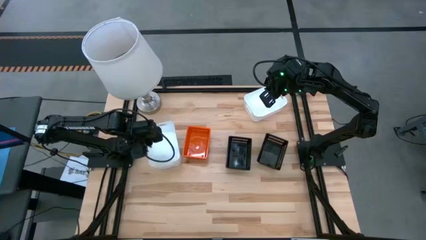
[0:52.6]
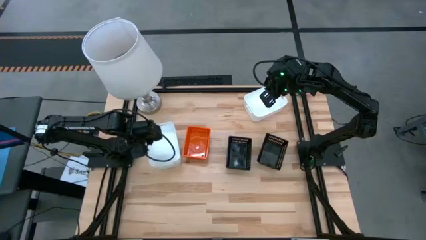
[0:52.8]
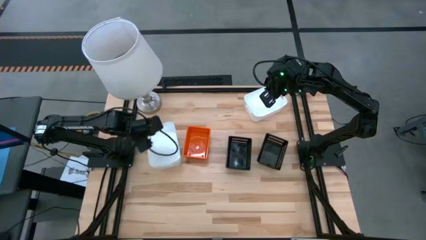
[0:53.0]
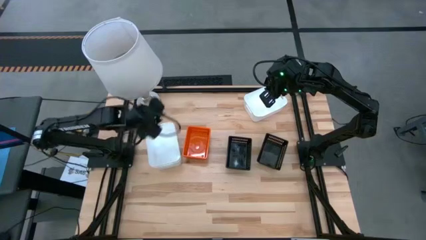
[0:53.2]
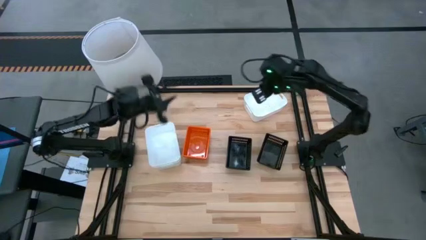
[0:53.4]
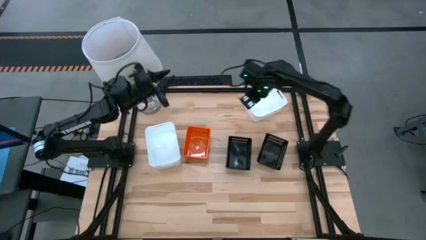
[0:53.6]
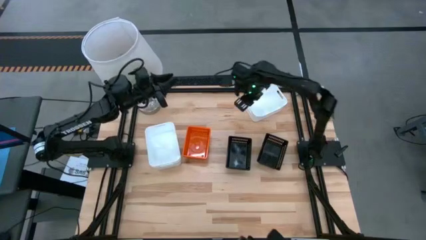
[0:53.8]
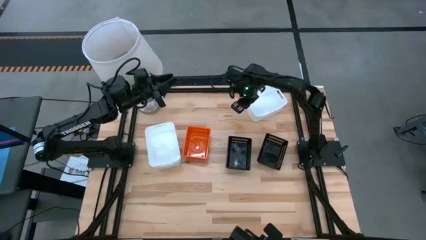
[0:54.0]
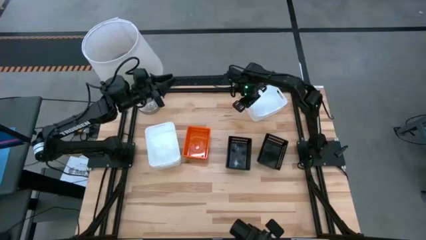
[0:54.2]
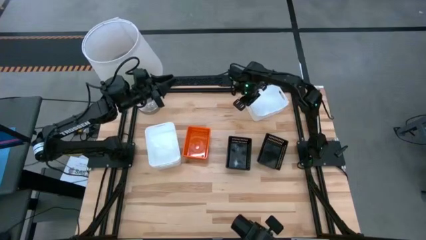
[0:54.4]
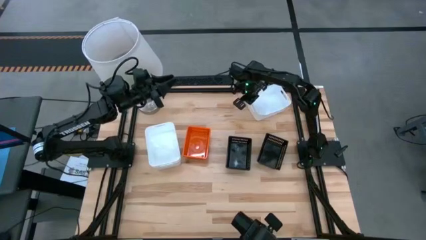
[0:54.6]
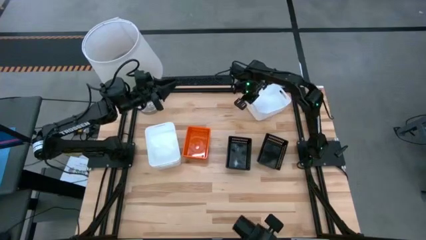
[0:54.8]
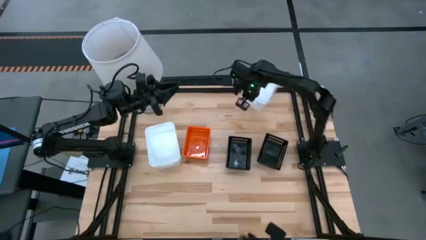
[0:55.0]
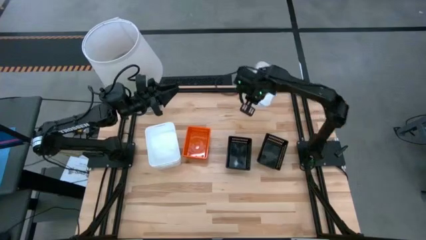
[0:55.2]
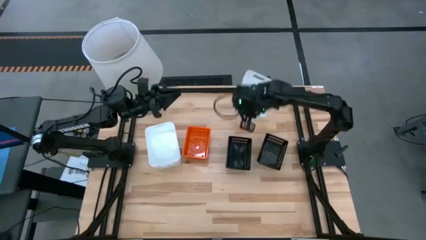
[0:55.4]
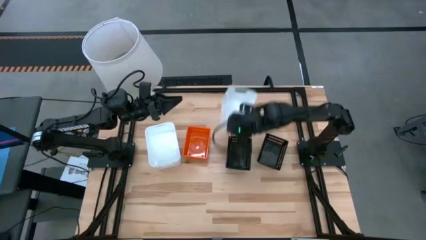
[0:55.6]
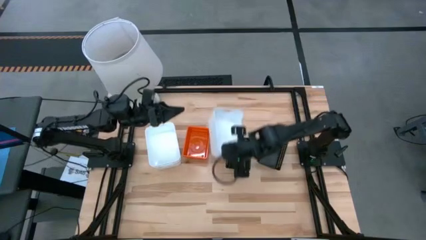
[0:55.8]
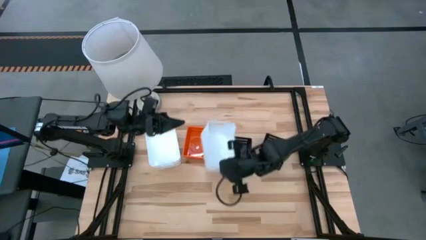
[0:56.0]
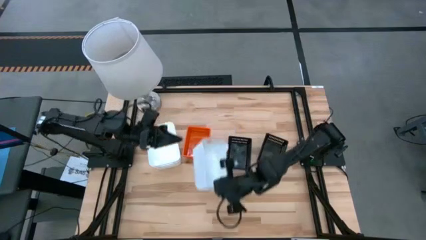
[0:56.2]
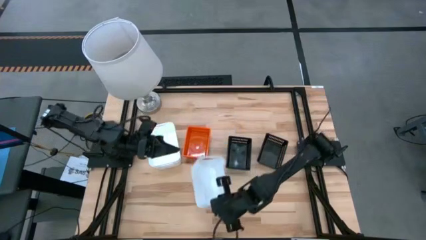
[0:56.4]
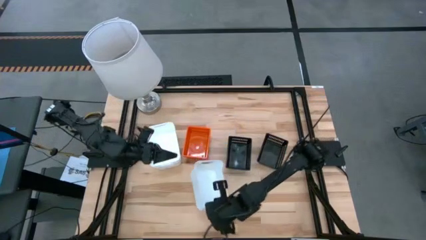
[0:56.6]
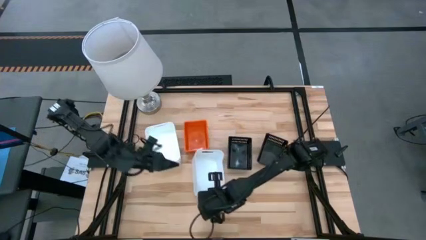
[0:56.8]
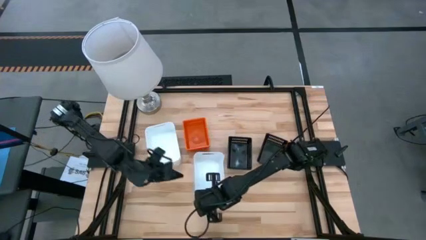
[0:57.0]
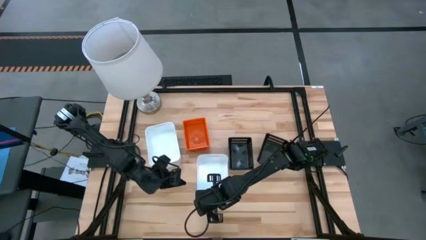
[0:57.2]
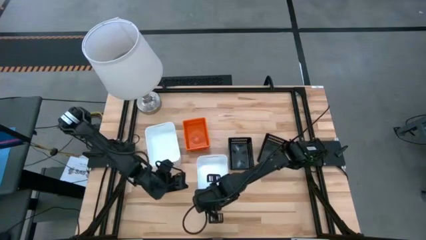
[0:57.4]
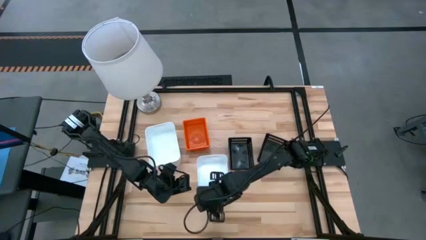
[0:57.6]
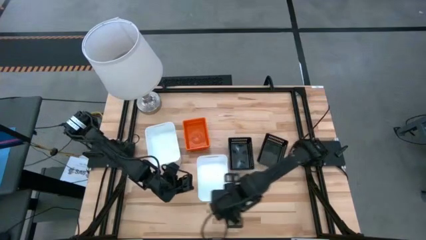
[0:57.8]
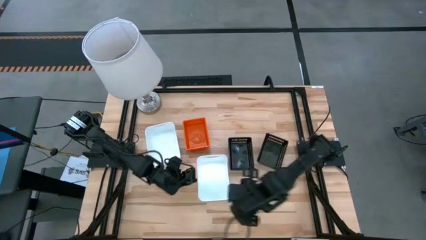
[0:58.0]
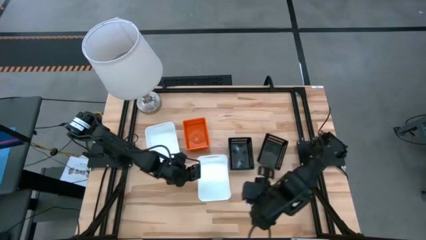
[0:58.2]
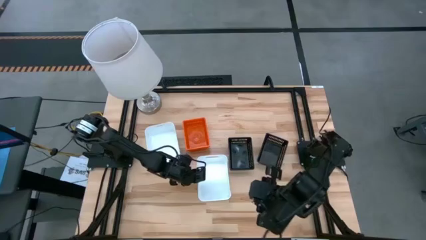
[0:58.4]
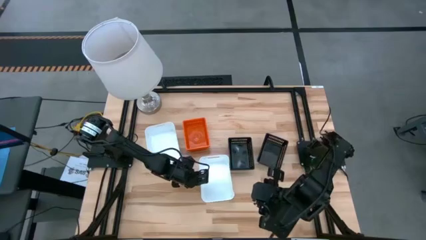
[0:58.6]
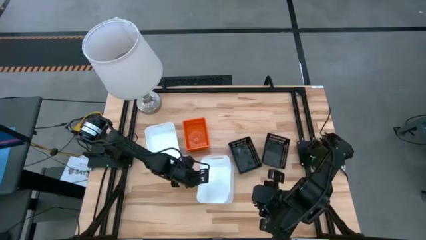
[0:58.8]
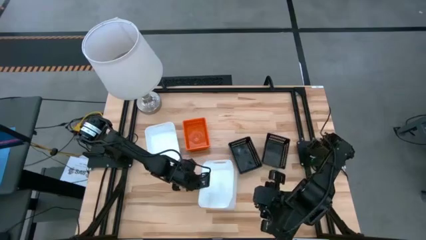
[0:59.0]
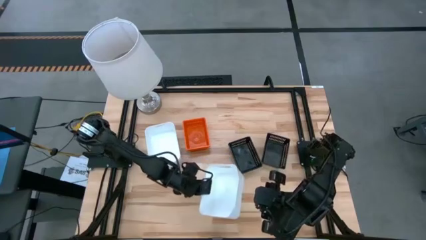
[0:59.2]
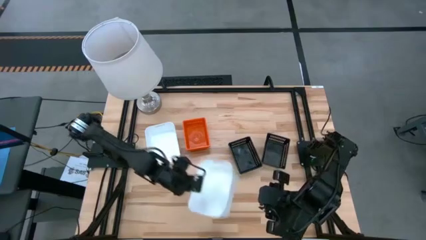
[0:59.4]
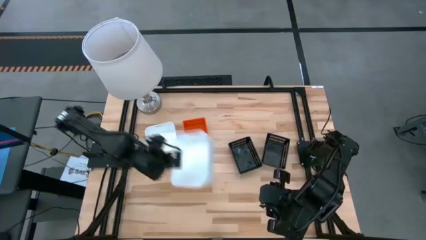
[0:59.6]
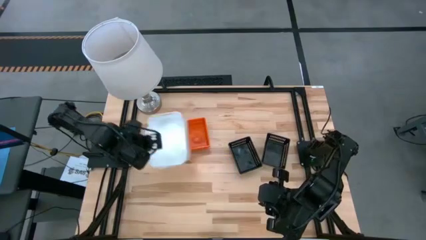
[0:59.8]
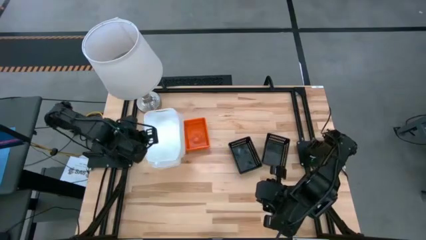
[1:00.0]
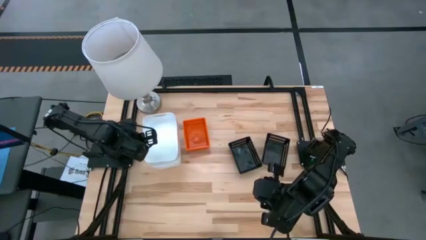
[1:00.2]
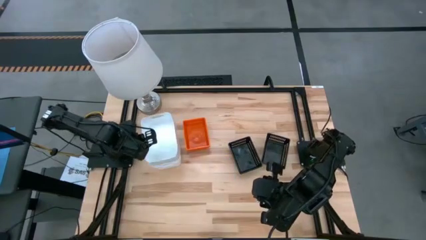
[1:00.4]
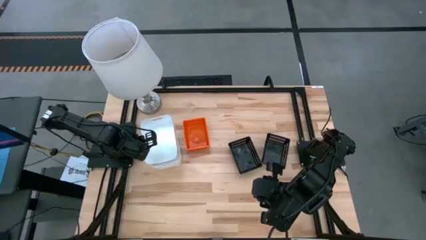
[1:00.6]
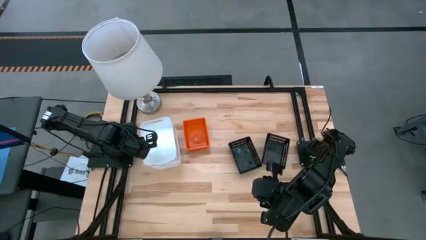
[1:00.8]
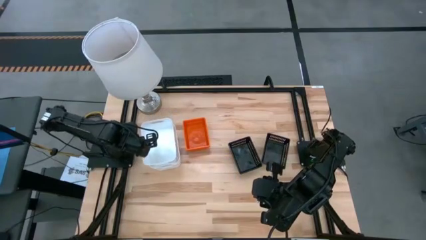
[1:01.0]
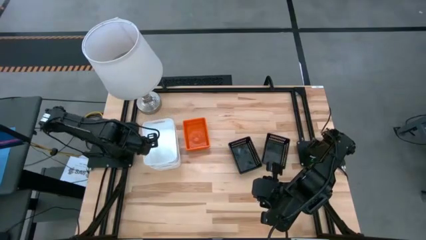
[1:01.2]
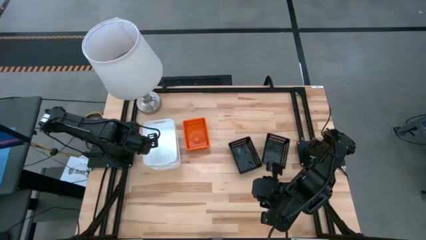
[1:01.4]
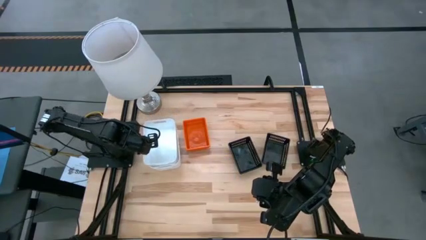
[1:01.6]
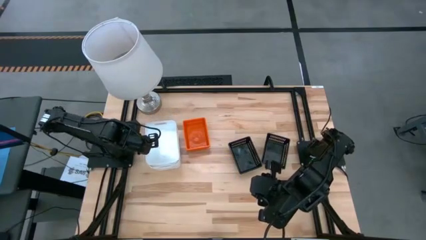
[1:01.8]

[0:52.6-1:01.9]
Stack the bottom white bin on top of the top white bin

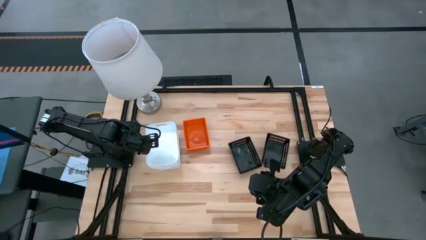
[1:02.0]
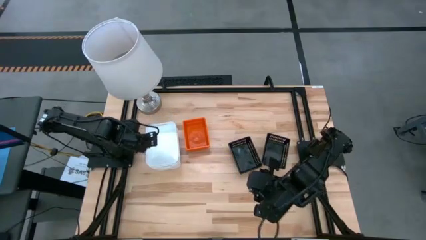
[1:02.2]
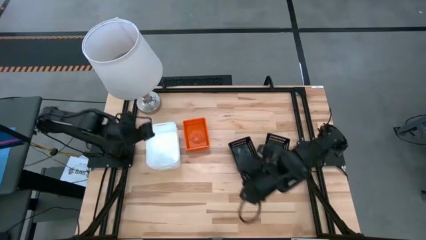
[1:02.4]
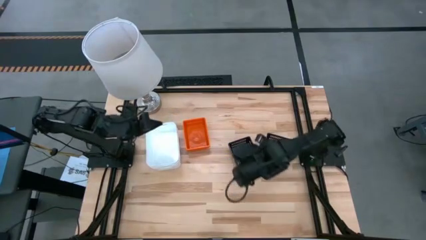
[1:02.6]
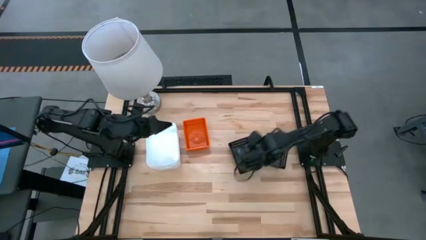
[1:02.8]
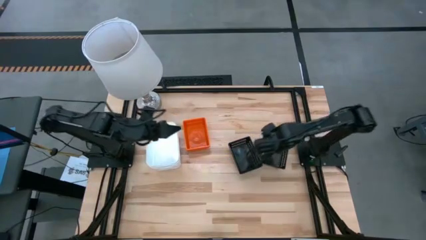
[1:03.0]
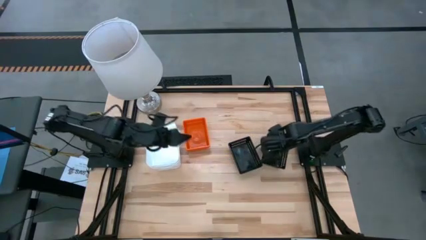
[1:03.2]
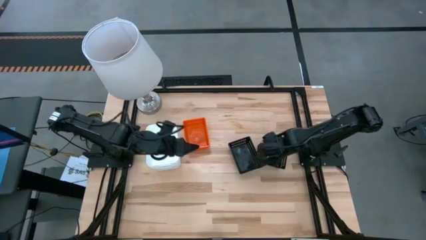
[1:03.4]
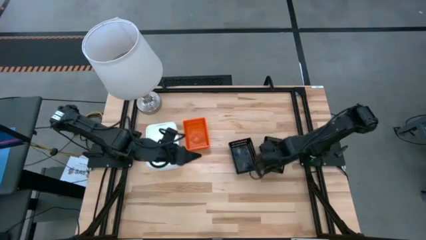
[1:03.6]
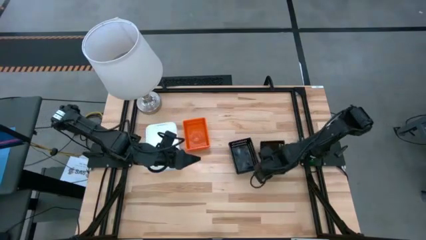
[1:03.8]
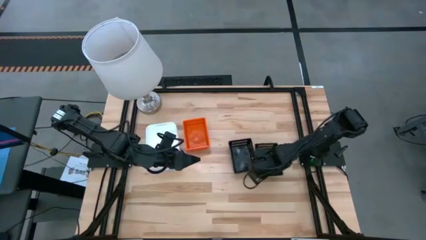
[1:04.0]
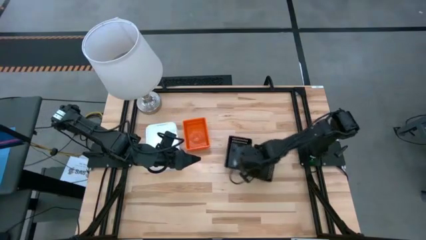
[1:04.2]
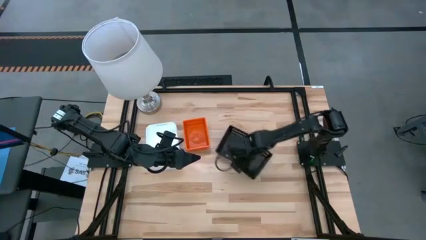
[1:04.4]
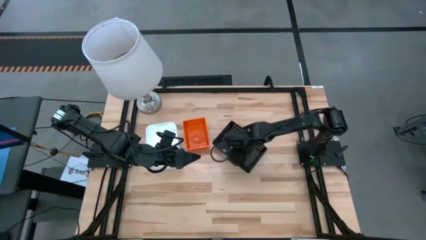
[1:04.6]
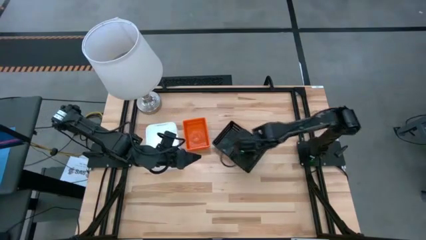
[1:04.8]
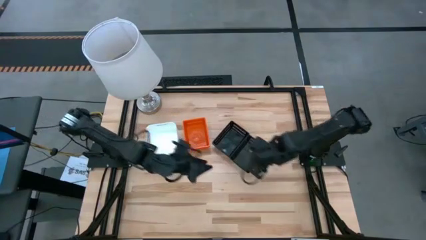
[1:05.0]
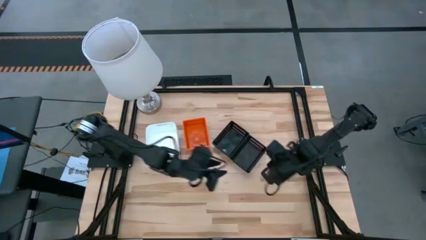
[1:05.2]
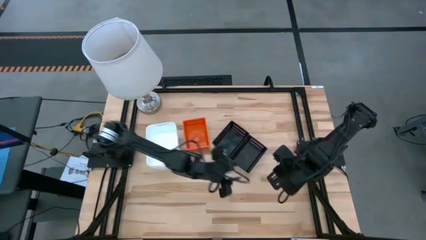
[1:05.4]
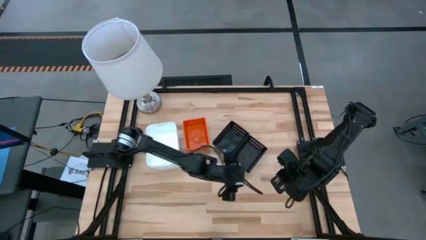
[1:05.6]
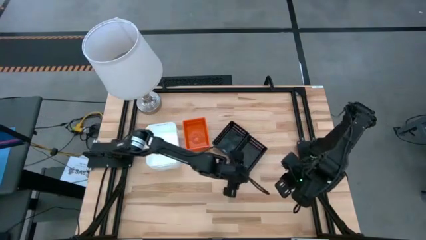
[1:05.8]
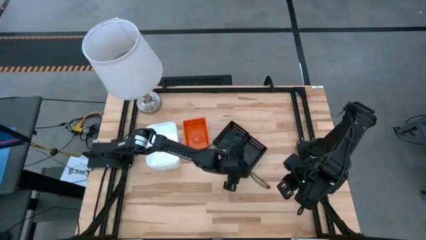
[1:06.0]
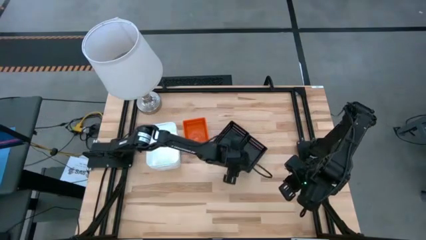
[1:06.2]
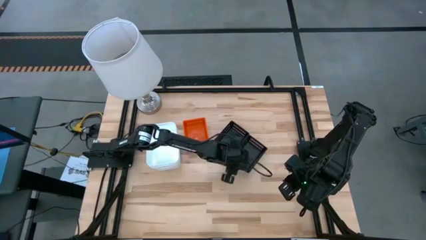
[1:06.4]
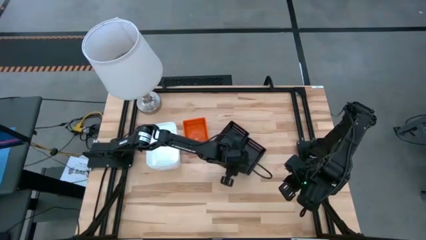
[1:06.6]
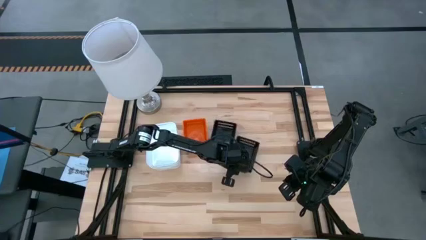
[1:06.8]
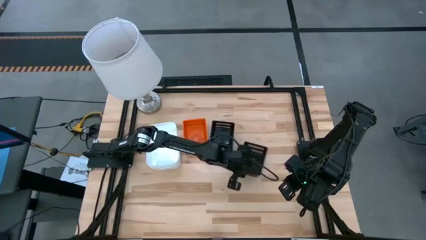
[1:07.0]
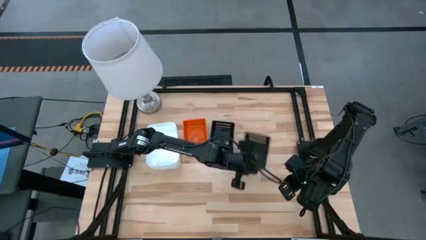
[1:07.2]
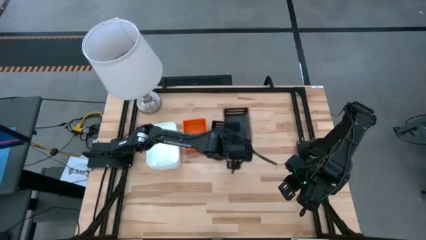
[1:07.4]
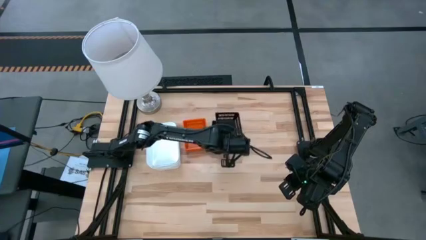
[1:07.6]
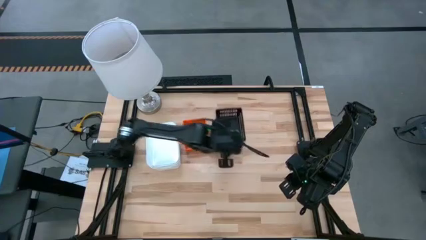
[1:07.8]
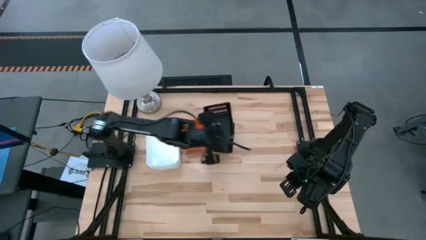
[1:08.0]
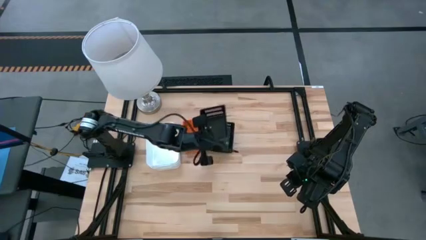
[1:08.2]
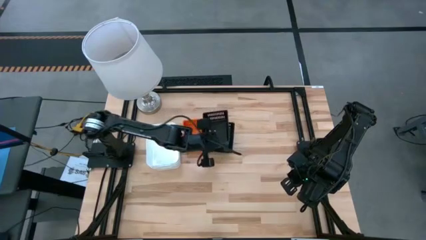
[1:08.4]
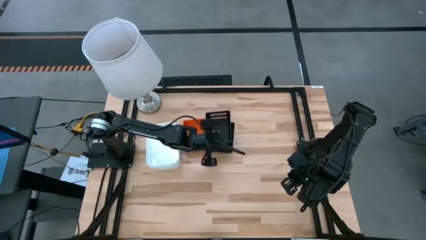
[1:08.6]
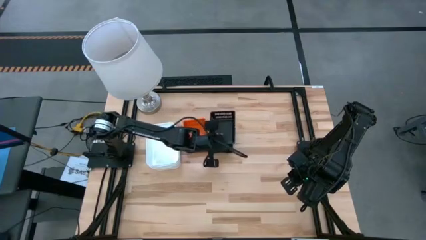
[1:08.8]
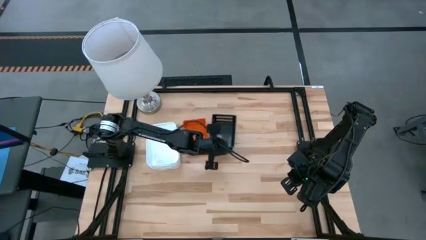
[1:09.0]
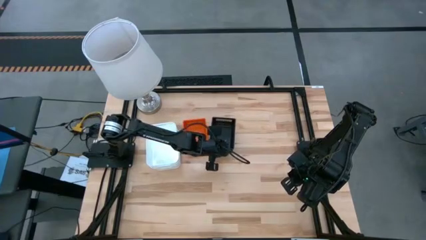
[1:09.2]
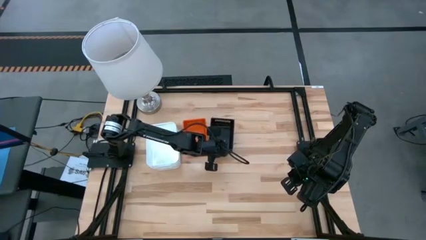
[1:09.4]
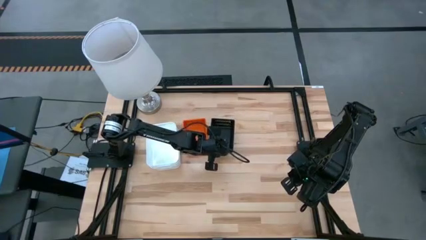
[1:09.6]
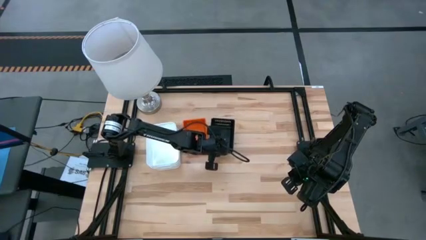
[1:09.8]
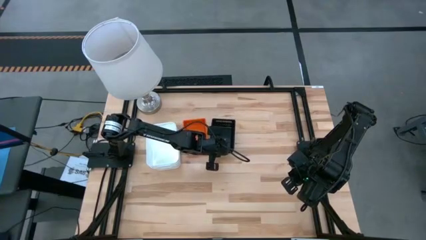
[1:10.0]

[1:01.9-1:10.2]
Stack the right black bin on top of the left black bin
